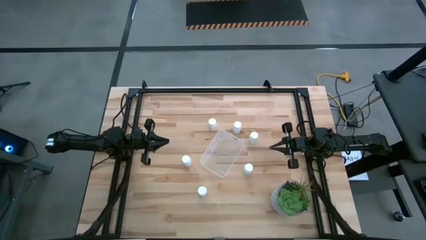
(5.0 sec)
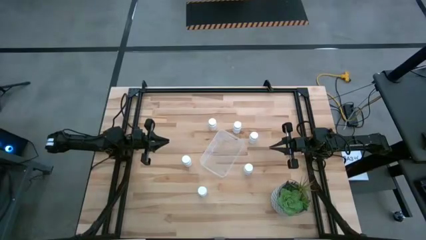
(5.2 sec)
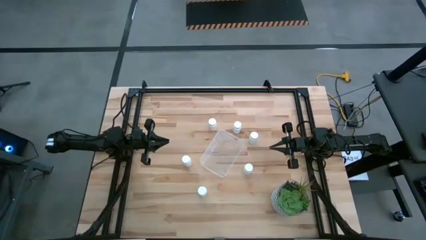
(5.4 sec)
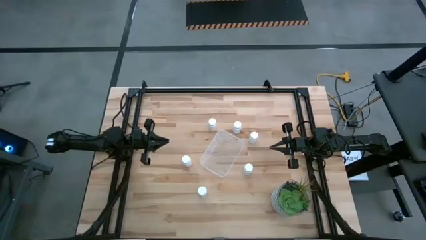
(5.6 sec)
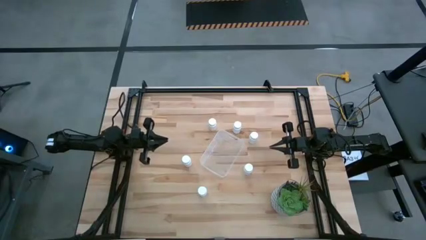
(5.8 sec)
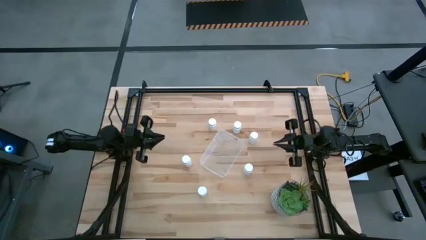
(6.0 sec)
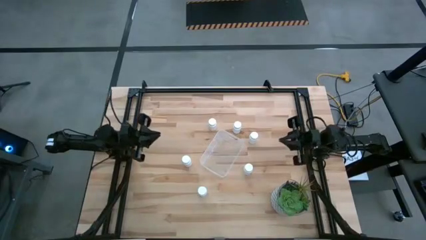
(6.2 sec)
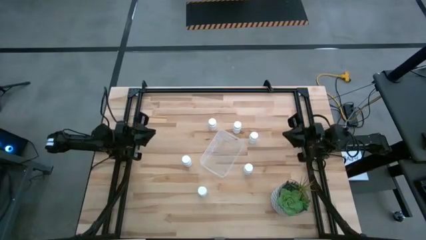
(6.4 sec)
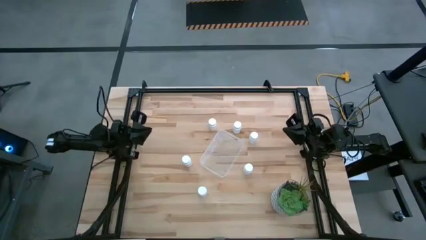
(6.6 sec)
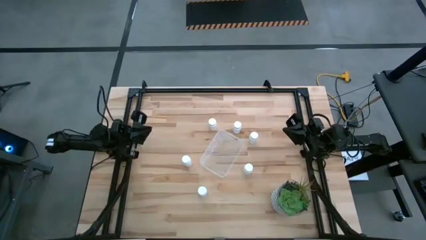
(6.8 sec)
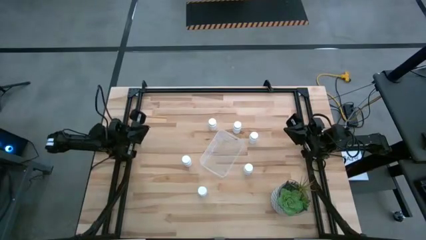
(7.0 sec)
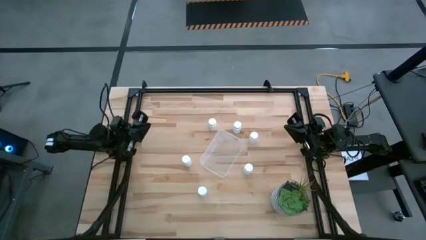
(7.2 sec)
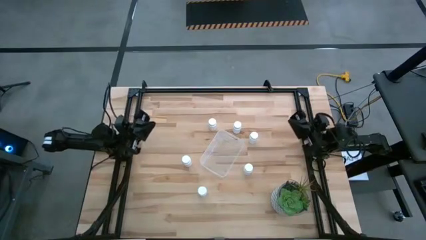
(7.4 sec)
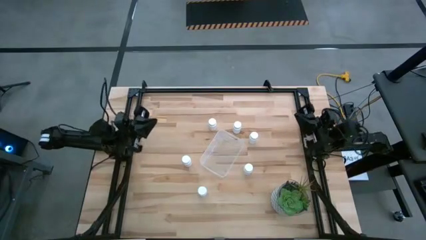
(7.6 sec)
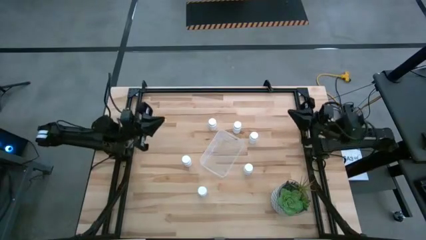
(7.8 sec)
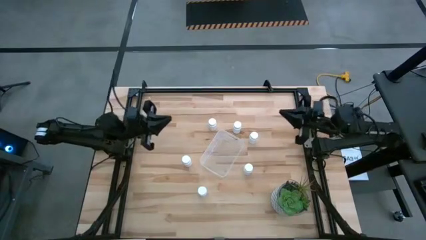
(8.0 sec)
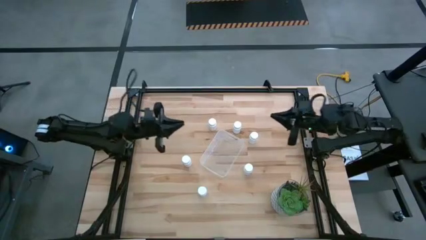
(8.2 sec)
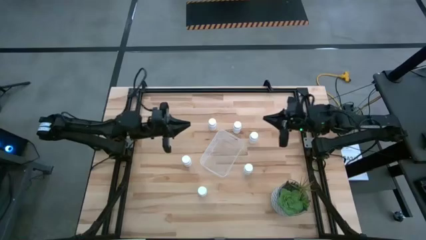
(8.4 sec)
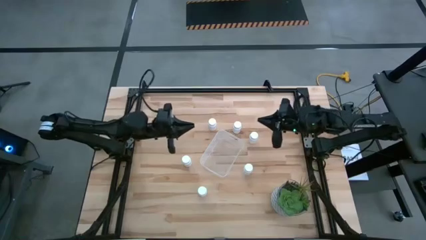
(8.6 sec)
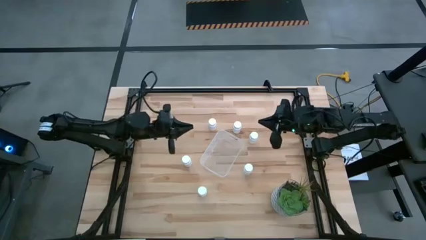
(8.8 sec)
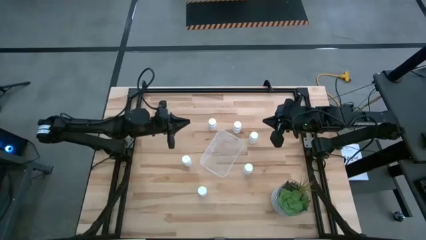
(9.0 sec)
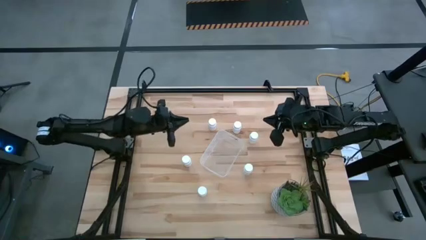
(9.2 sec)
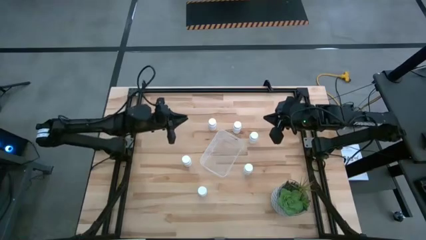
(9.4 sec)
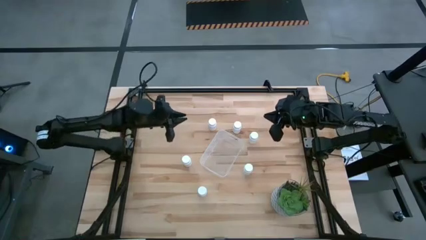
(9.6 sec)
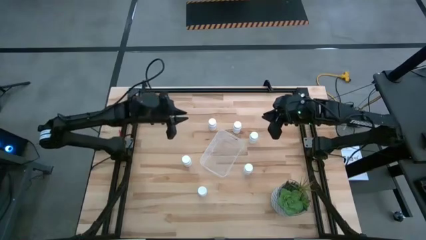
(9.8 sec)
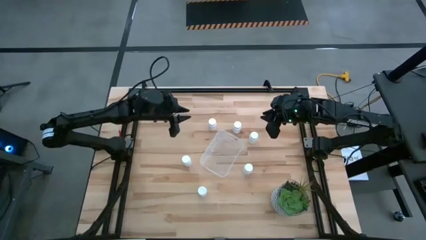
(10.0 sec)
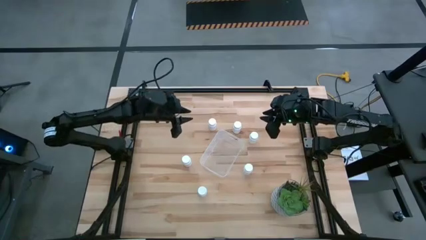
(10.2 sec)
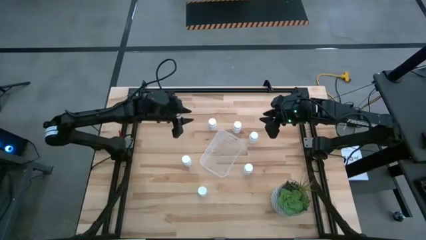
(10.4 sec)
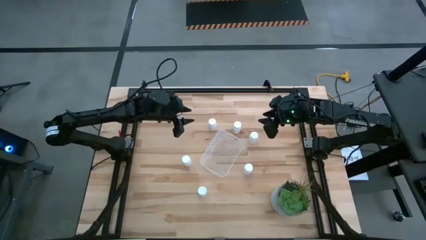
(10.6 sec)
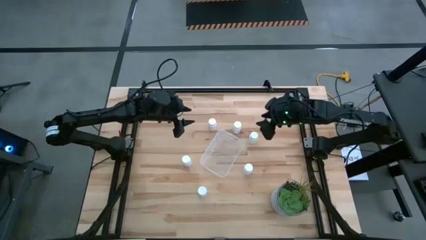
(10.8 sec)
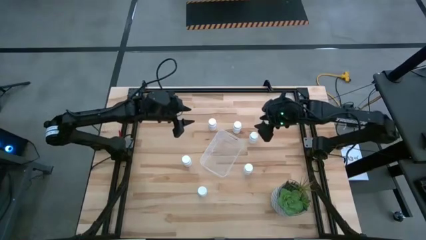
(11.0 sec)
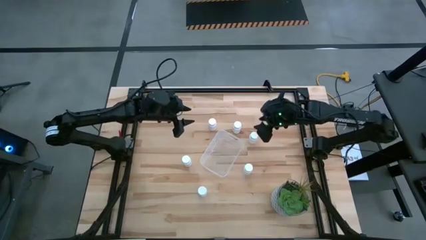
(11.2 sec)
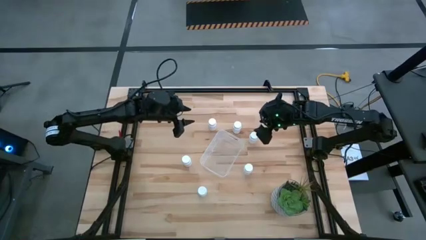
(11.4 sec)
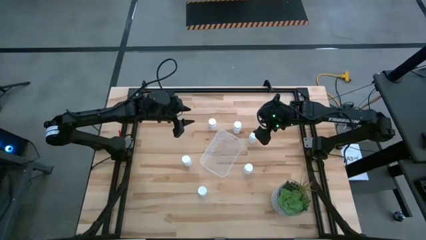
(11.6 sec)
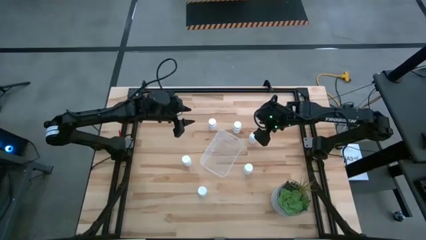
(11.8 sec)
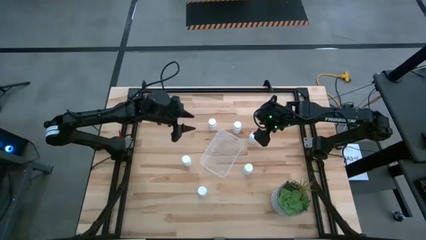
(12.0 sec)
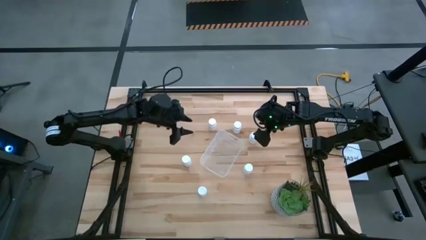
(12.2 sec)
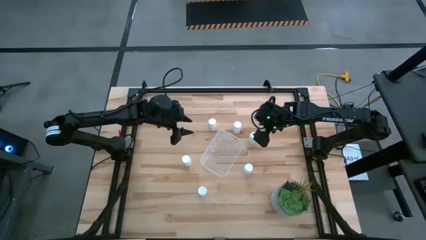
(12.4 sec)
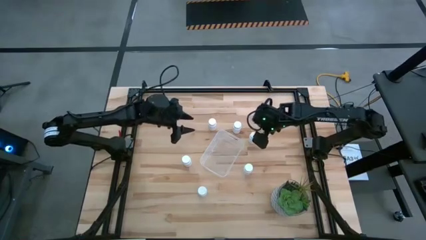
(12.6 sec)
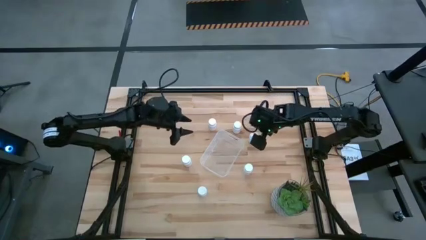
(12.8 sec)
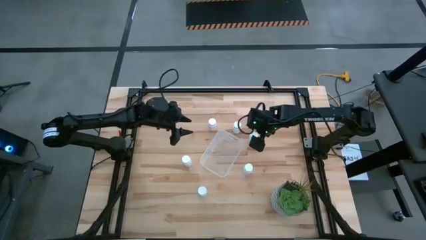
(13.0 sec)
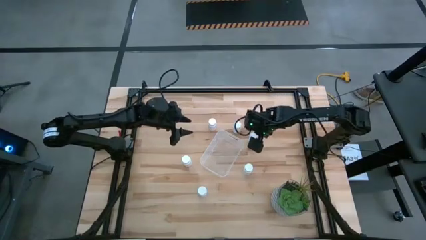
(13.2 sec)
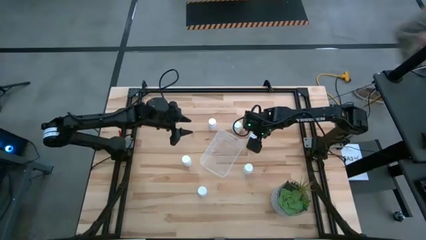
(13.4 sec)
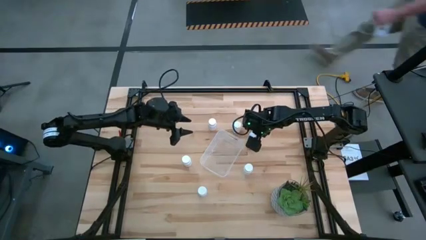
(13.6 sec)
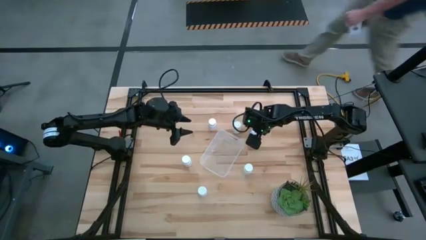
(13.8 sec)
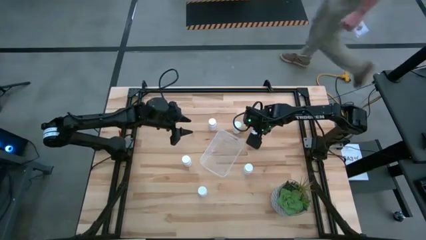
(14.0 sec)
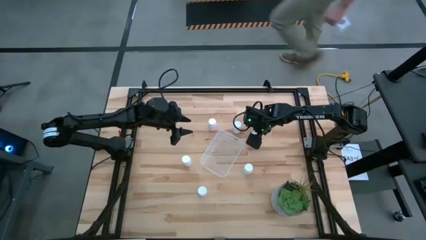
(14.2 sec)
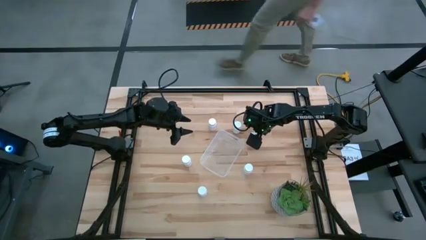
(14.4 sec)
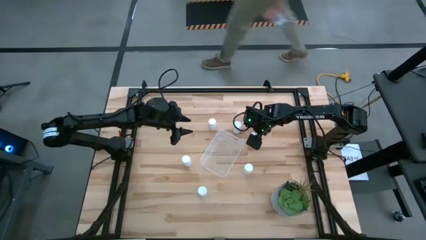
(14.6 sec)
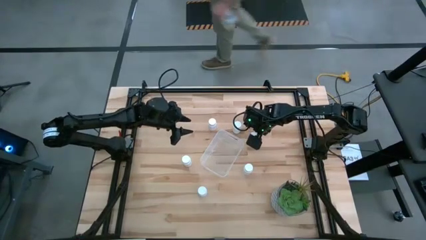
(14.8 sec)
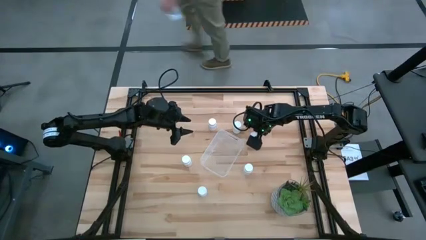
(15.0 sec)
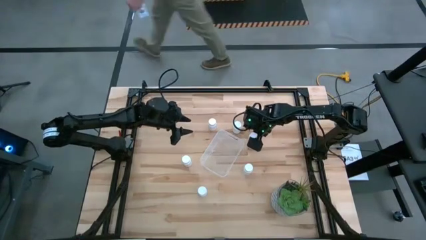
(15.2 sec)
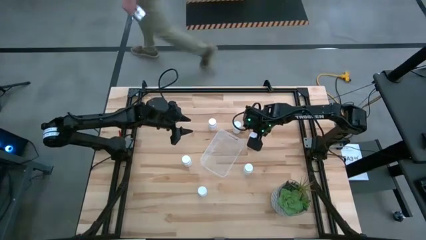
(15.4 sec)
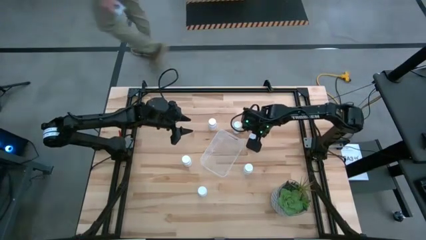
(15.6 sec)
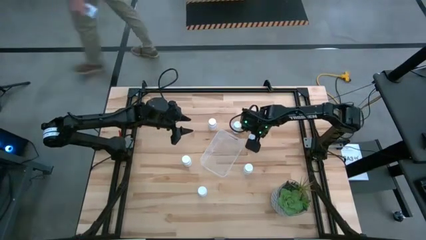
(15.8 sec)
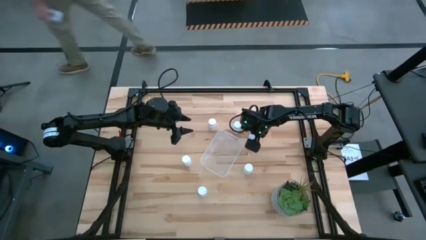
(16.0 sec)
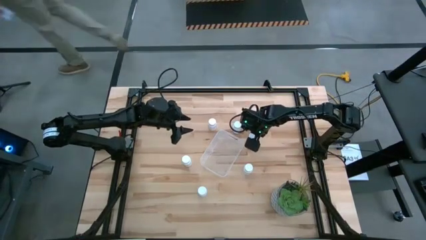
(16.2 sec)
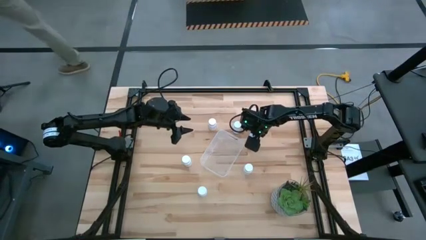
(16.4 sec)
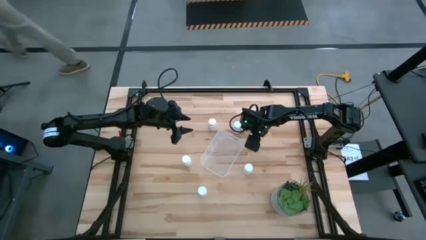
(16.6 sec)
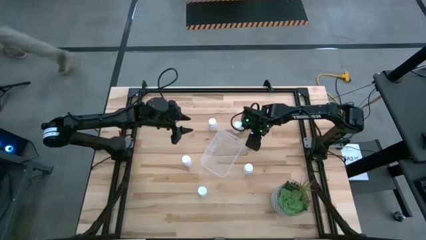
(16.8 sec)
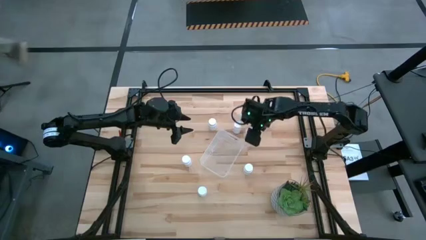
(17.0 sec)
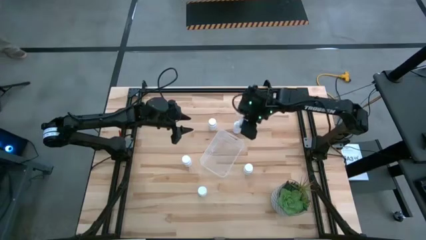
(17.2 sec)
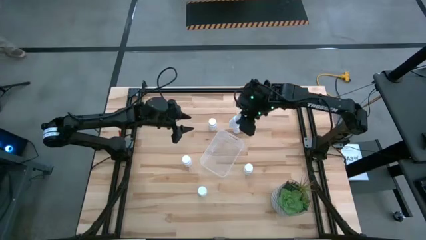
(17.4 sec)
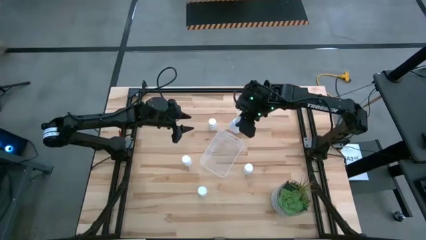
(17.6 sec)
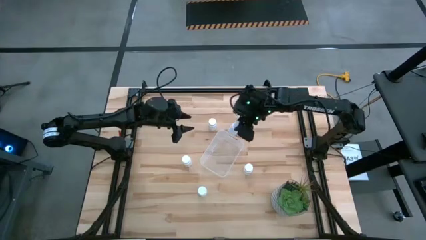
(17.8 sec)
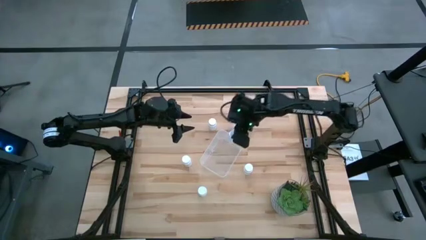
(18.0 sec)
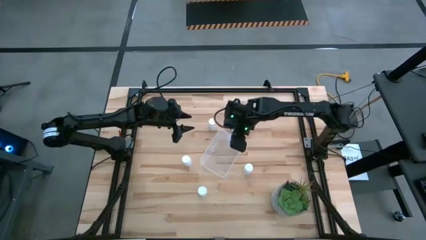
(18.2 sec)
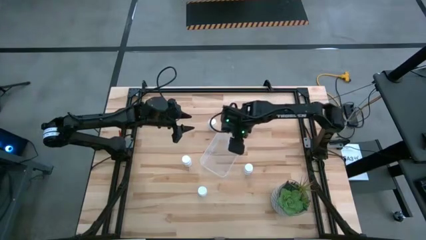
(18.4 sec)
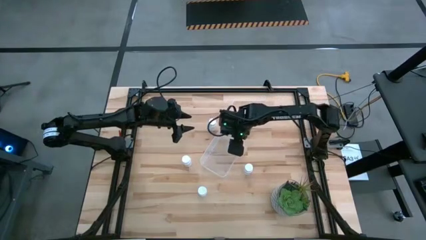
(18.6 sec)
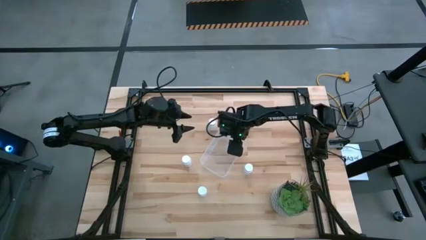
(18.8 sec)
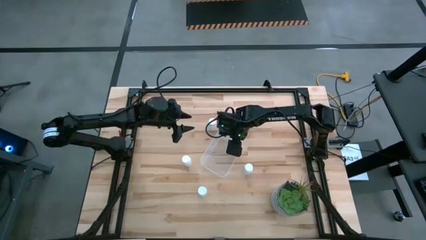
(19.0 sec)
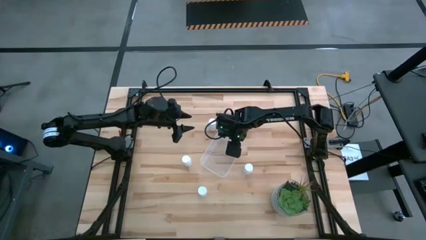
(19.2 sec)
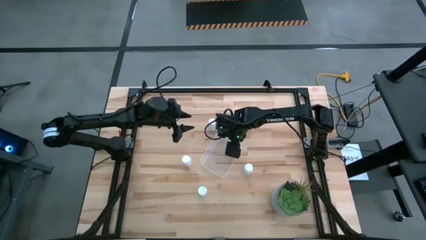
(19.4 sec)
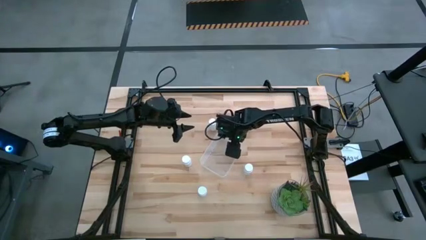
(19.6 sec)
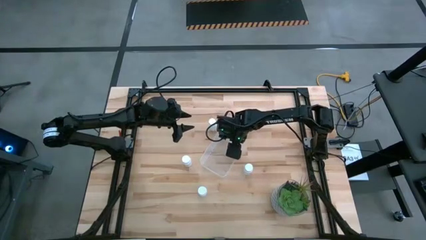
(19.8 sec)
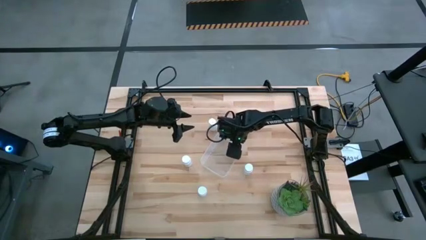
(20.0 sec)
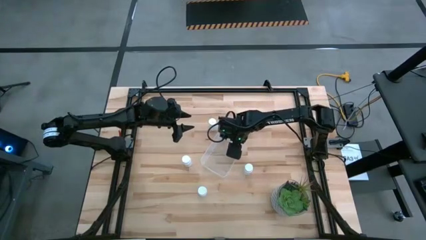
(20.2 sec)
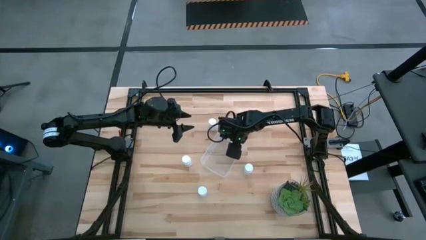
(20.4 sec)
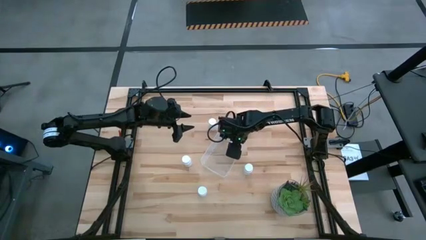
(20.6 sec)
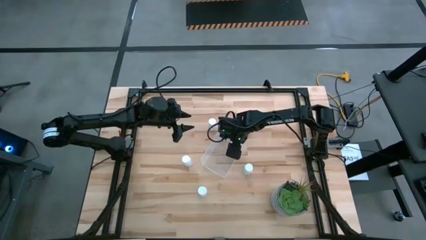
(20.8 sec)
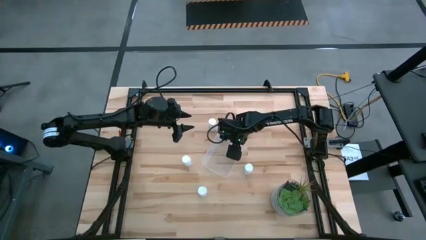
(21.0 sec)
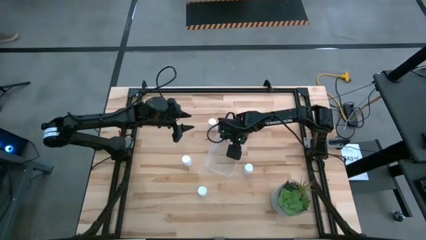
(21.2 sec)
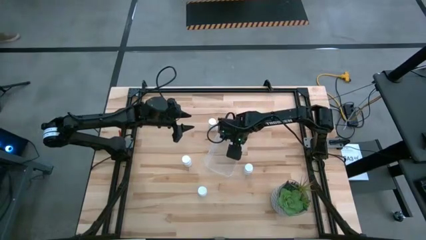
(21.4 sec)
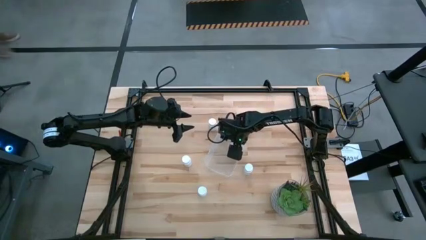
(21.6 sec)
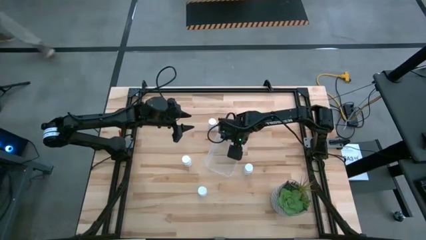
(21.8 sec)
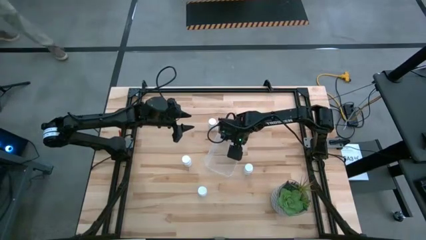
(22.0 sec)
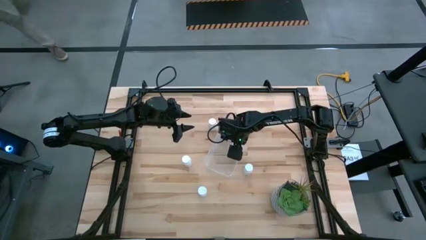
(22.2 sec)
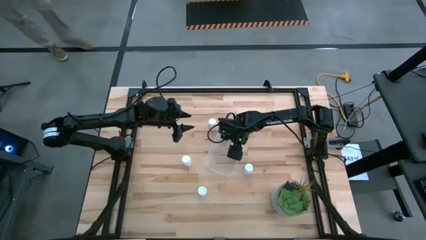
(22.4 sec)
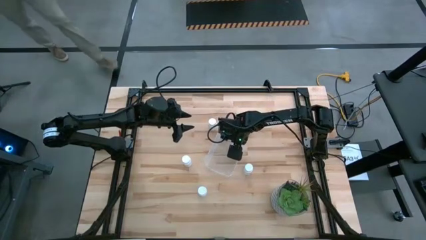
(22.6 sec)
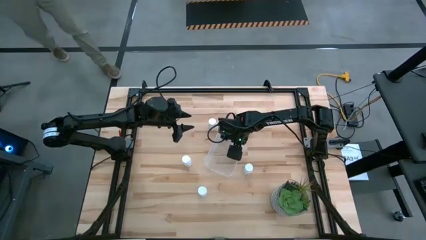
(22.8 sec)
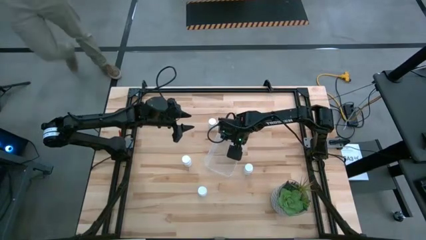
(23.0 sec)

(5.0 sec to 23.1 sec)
Task: Pick and place pill bottles into a basket
Put the medicine bottle into the transparent bin
